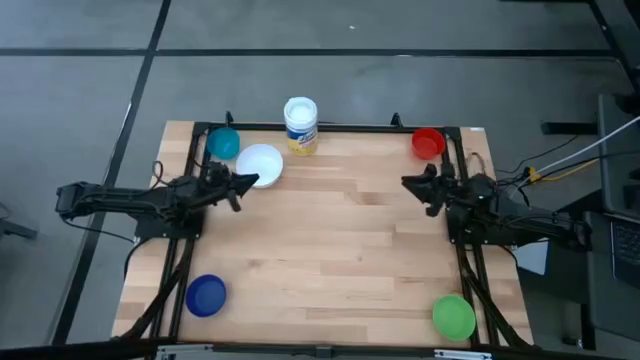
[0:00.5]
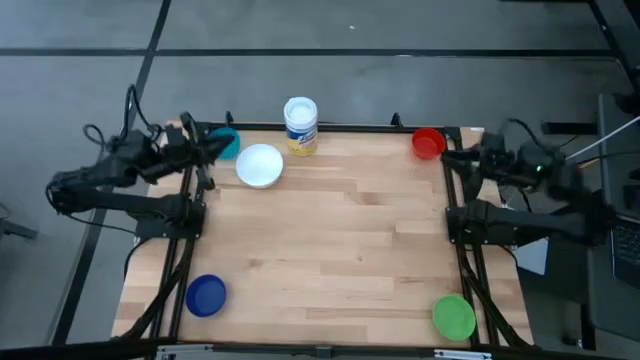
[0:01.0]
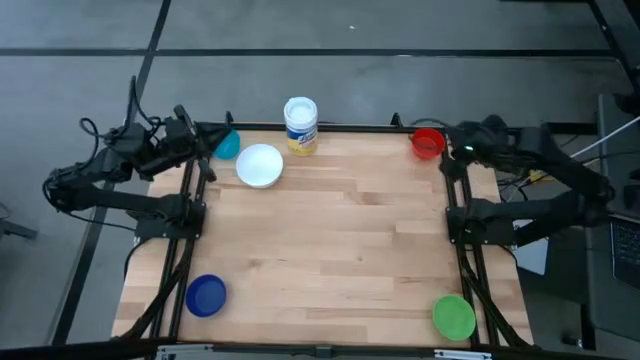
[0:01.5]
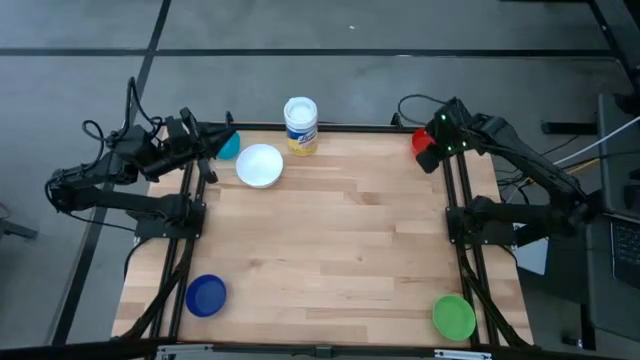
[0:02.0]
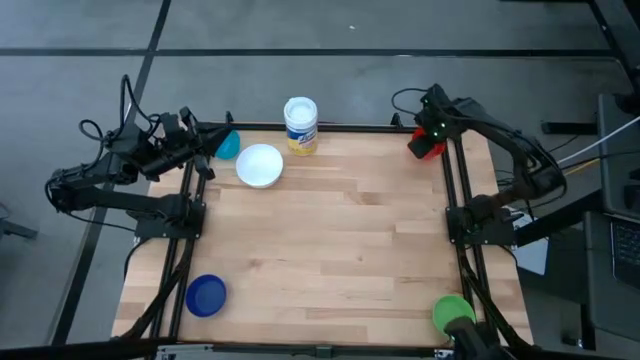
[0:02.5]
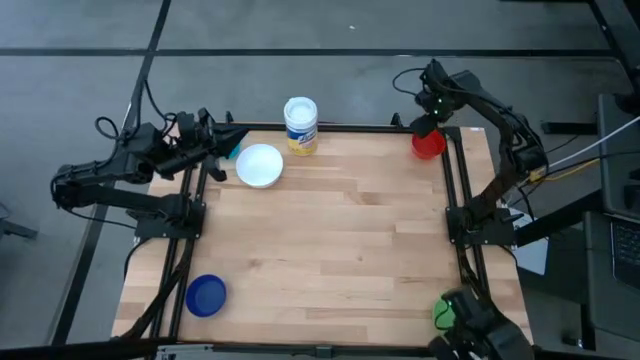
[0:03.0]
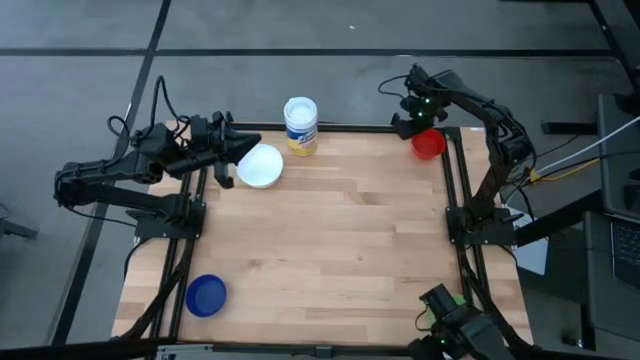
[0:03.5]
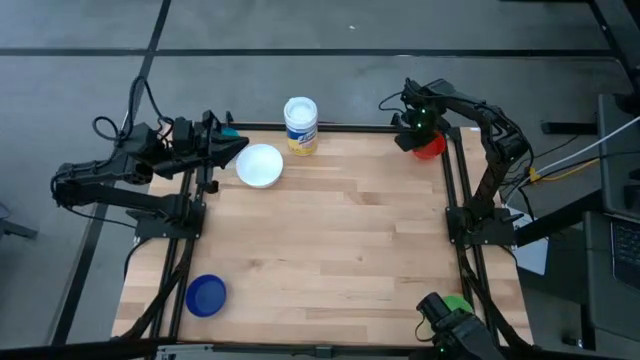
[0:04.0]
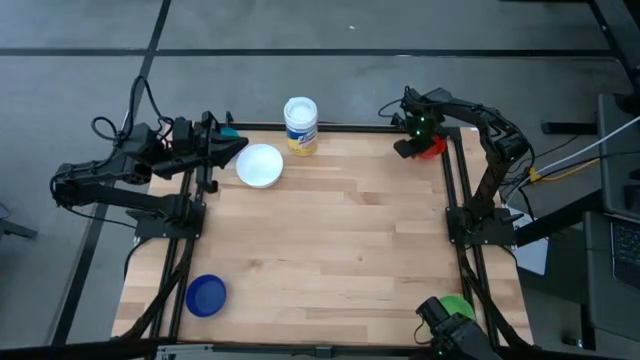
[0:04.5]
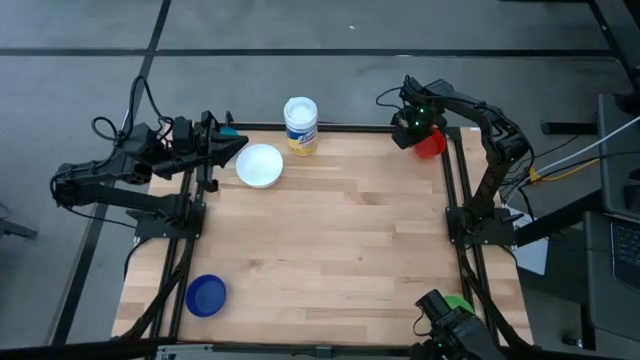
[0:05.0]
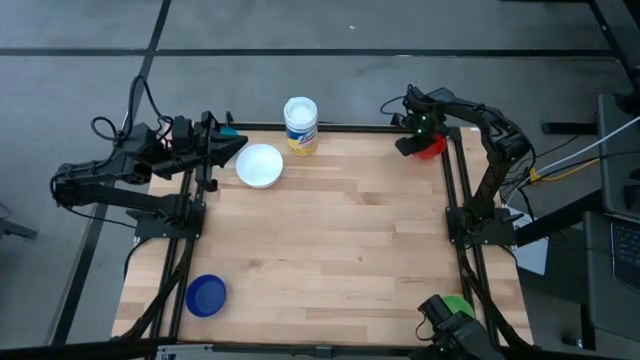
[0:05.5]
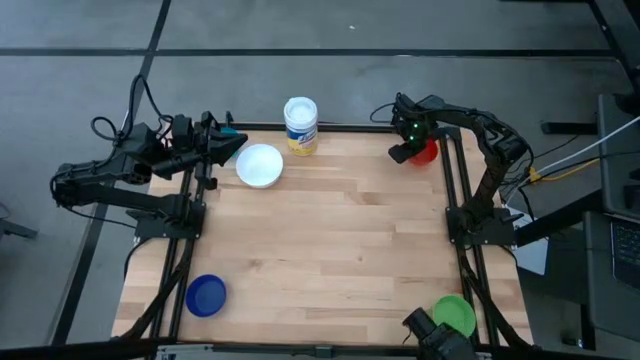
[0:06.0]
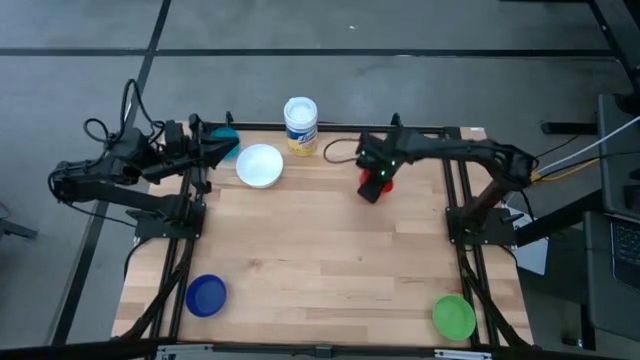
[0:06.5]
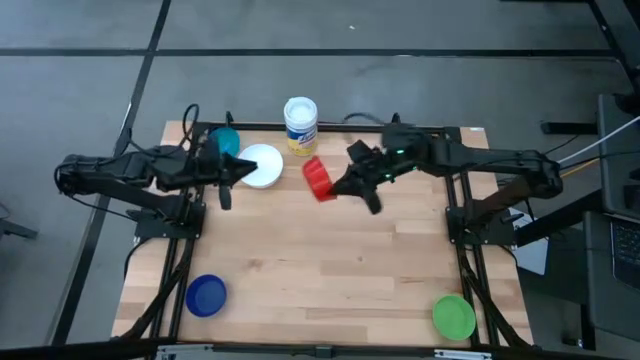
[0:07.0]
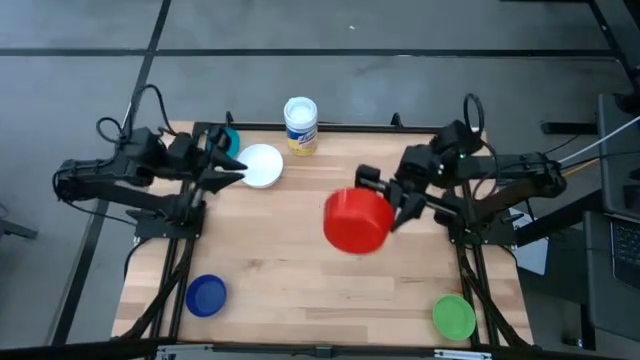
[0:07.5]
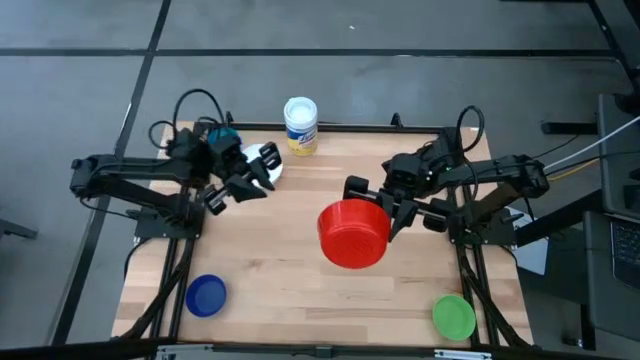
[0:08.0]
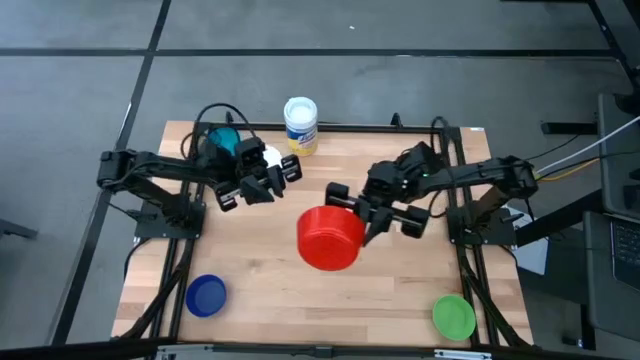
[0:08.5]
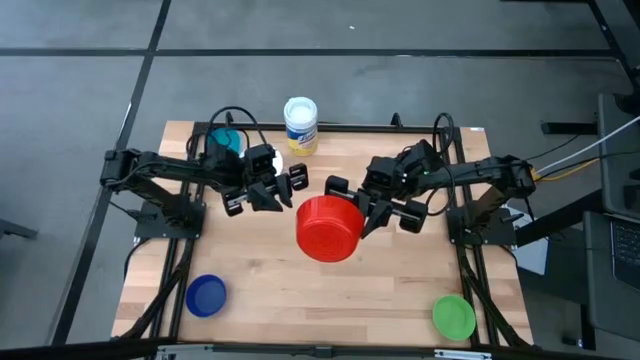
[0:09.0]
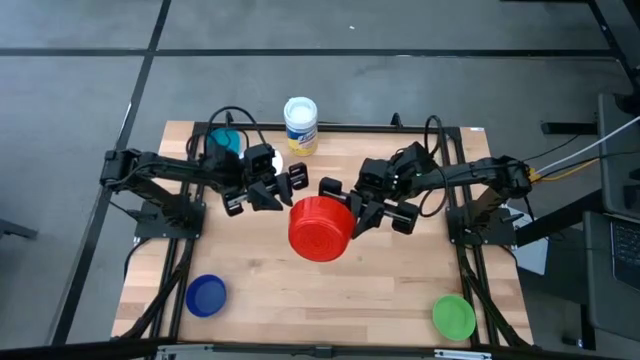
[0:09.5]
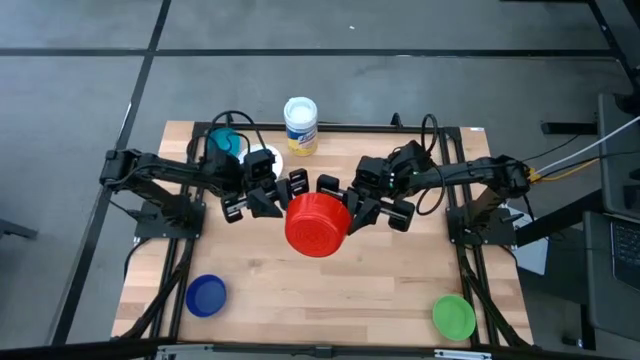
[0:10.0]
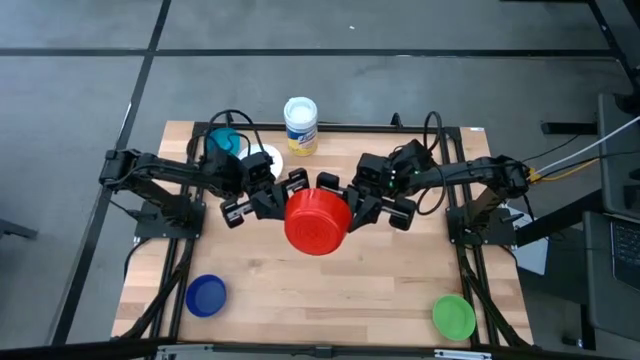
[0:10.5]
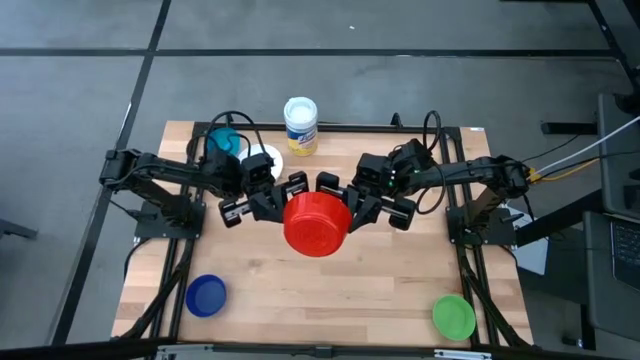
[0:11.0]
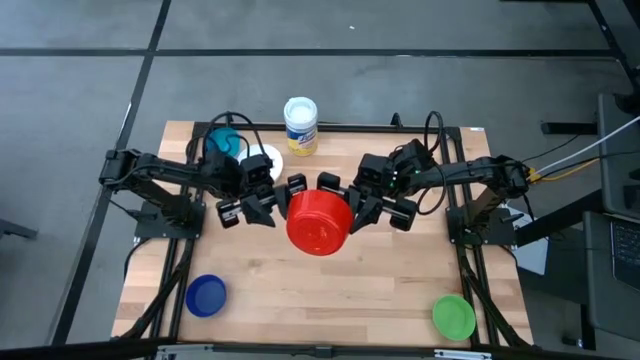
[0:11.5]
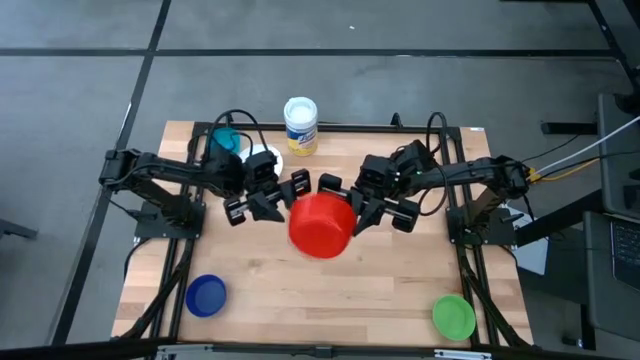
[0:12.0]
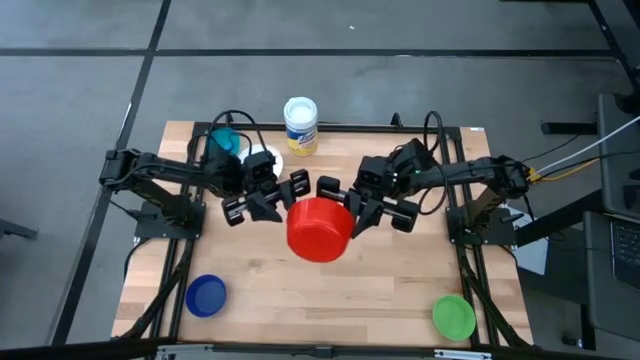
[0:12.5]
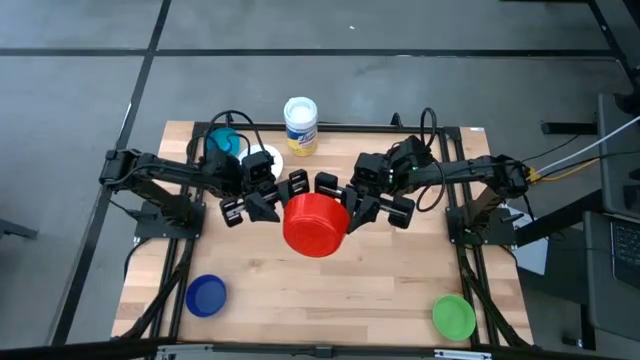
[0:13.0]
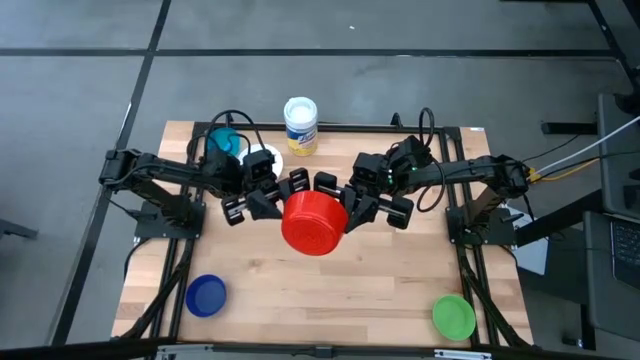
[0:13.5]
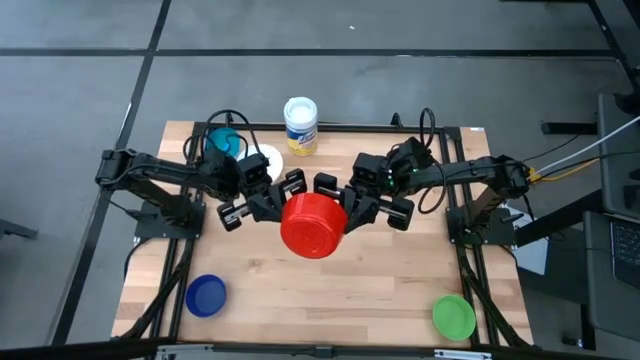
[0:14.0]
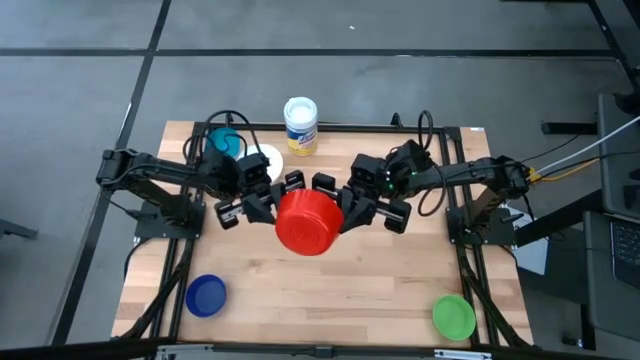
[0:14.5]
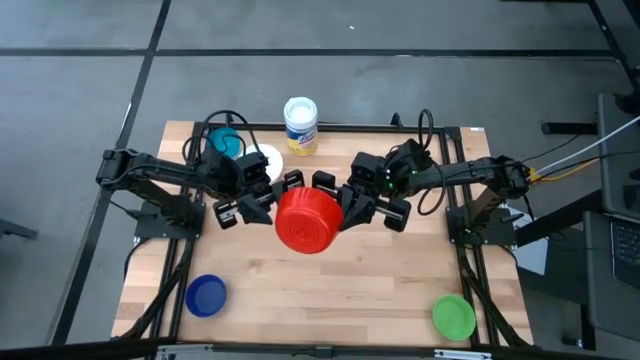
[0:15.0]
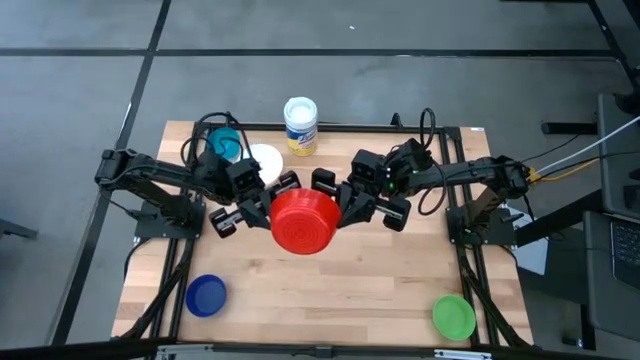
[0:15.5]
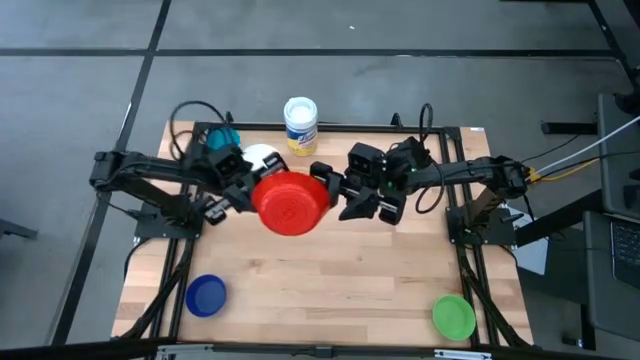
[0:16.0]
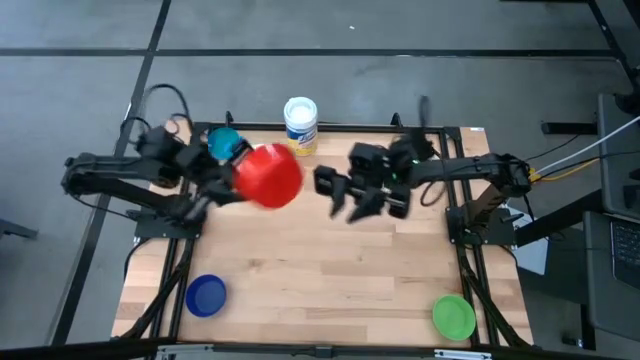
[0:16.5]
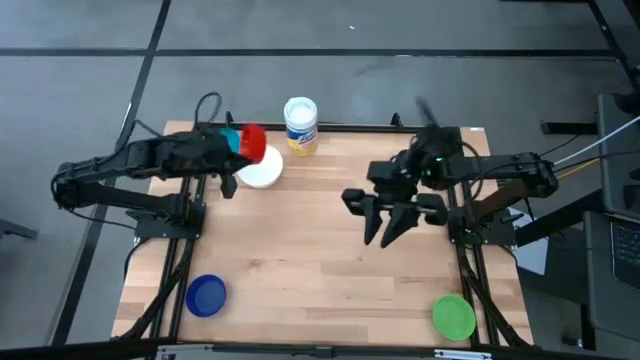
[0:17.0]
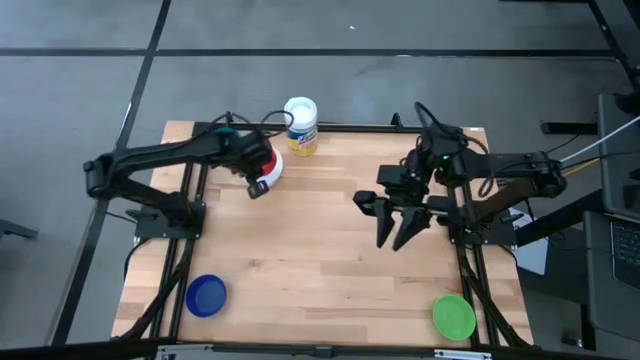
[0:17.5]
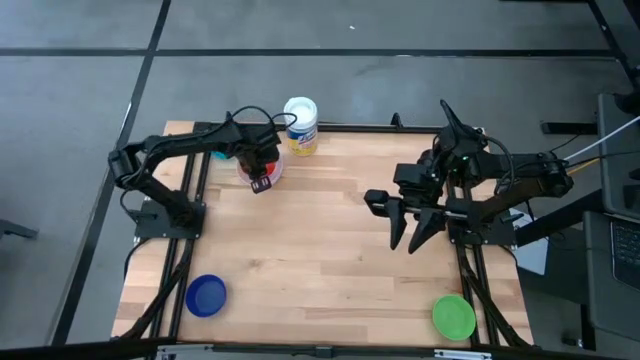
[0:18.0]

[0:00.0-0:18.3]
Stack the red bowl on top of the white bowl

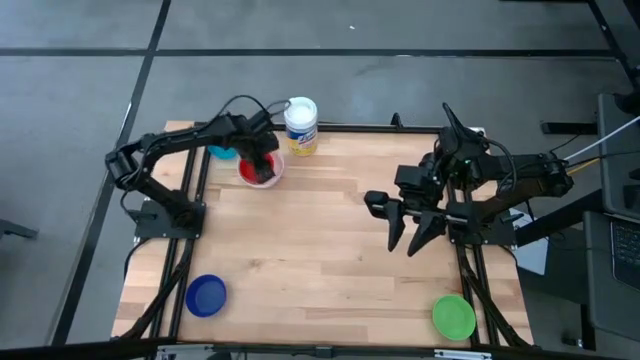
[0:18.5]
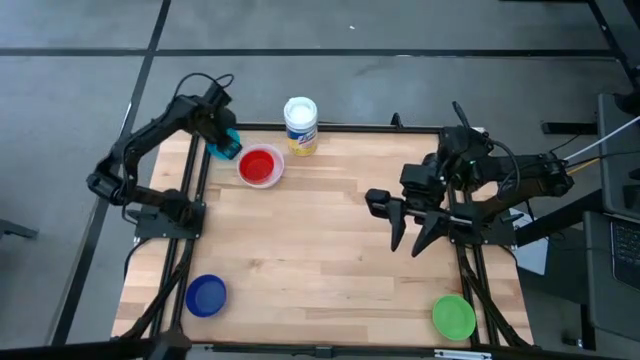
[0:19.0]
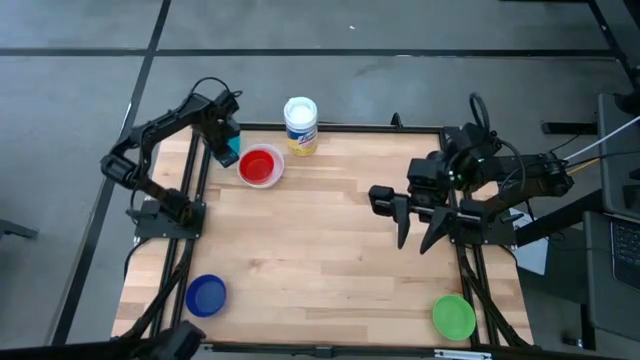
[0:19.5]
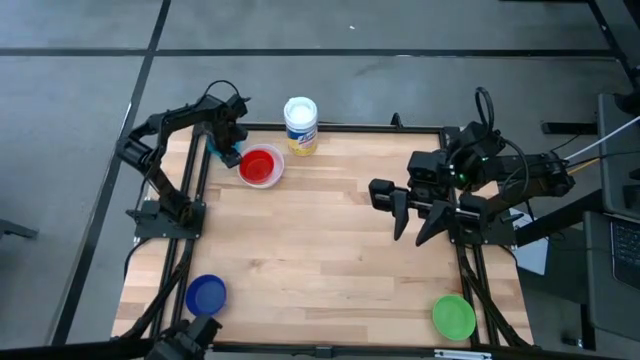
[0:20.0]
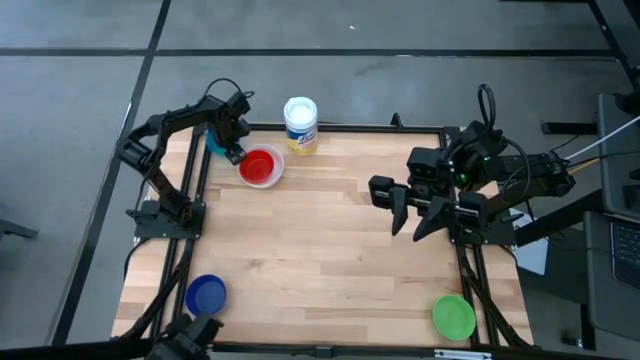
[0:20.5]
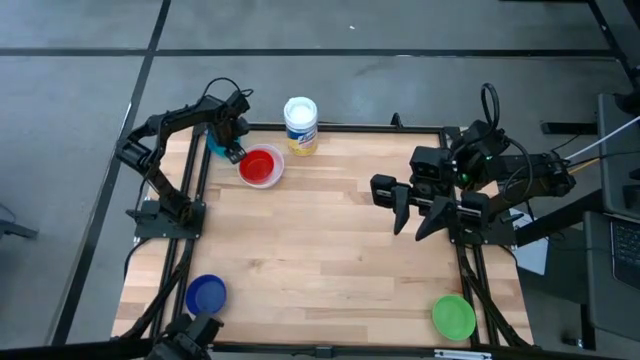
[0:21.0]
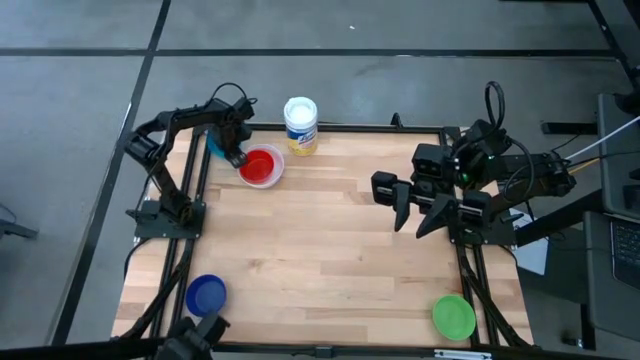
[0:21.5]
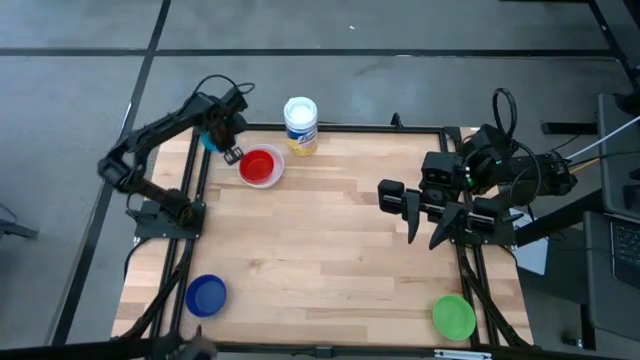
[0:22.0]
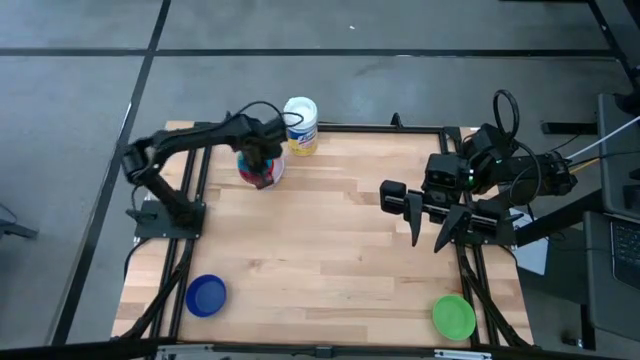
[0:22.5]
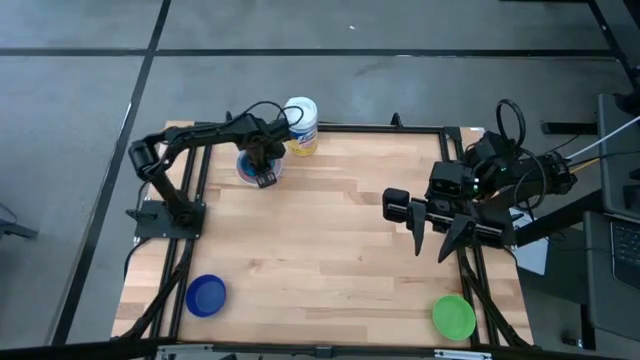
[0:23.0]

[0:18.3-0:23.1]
Stack the light blue bowl on top of the red bowl
